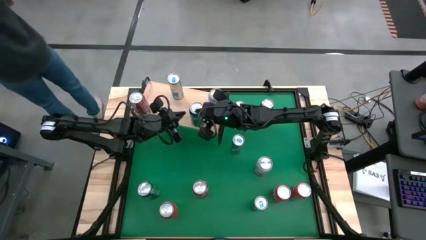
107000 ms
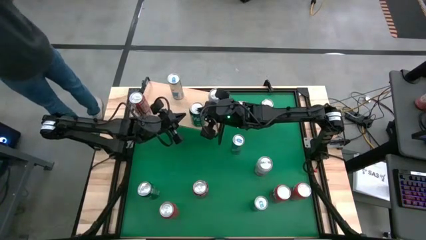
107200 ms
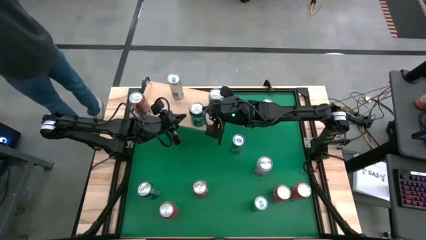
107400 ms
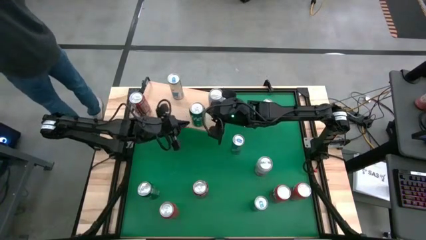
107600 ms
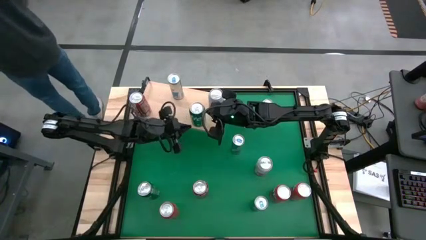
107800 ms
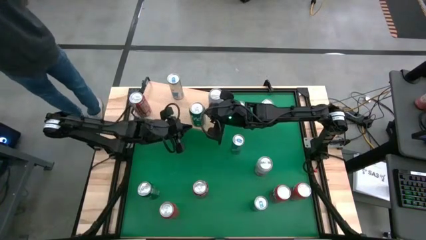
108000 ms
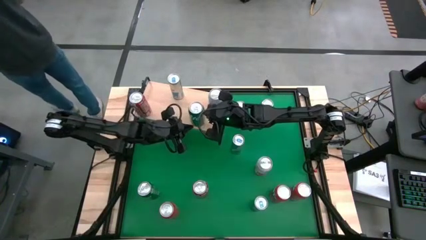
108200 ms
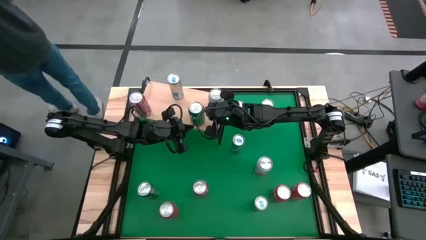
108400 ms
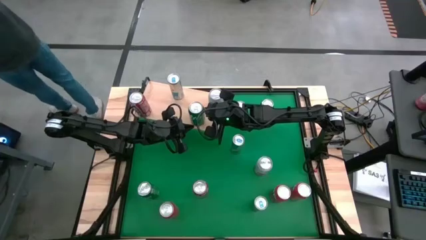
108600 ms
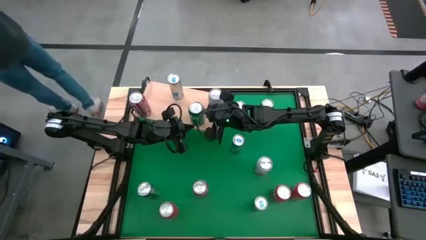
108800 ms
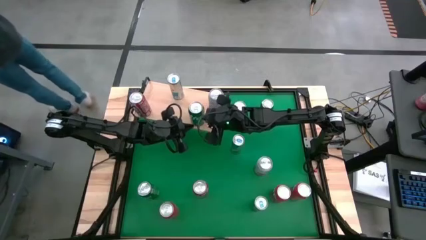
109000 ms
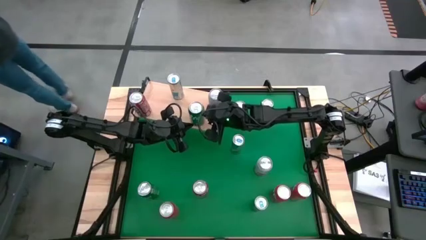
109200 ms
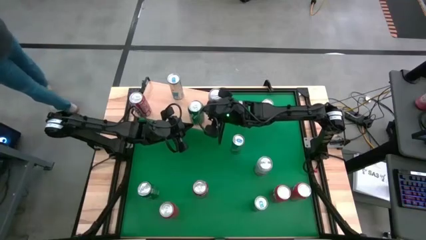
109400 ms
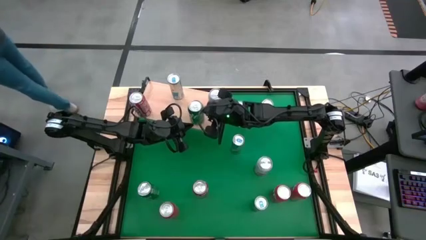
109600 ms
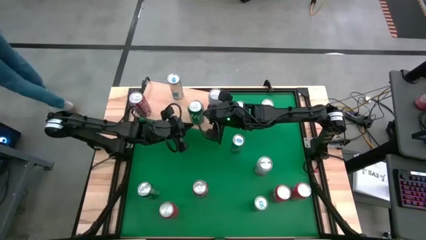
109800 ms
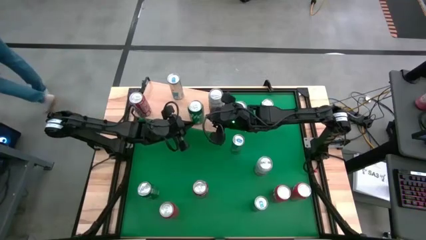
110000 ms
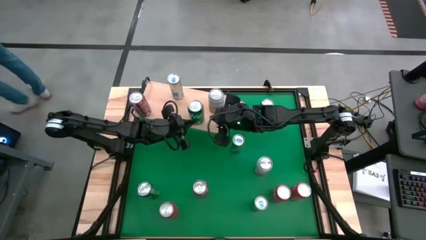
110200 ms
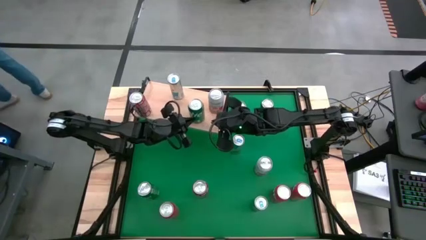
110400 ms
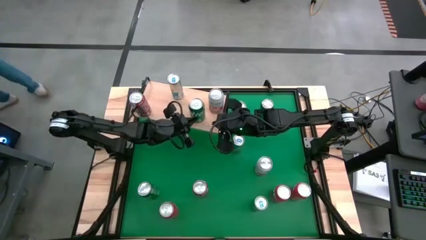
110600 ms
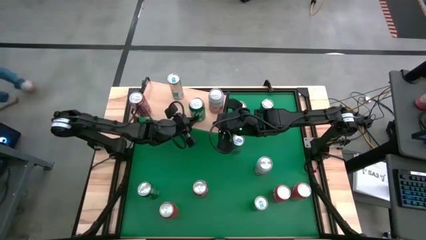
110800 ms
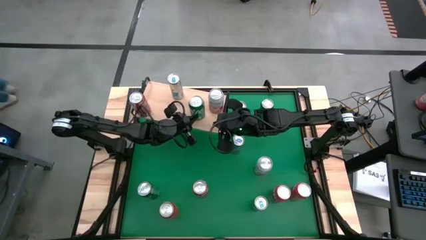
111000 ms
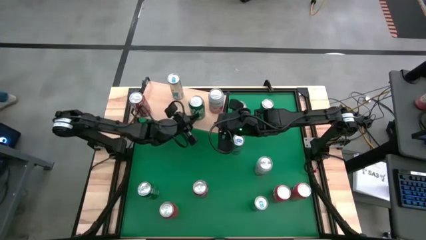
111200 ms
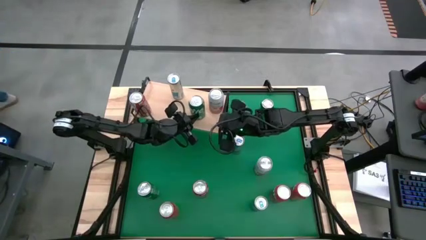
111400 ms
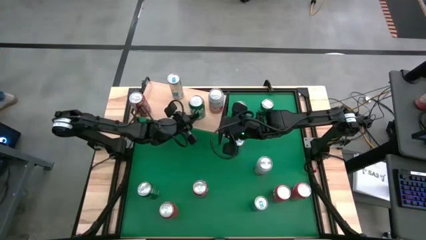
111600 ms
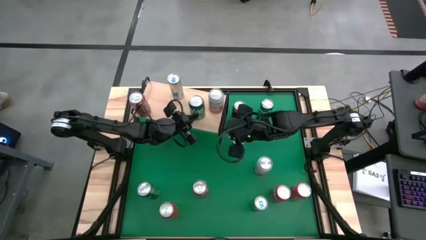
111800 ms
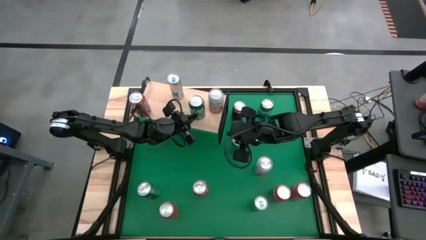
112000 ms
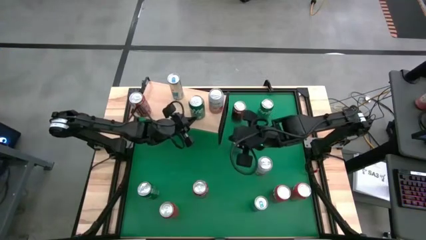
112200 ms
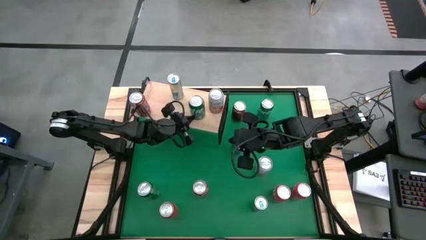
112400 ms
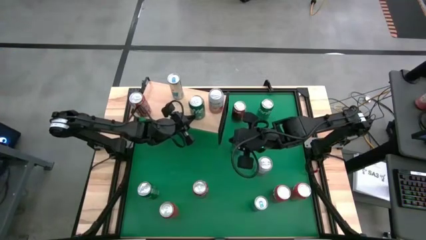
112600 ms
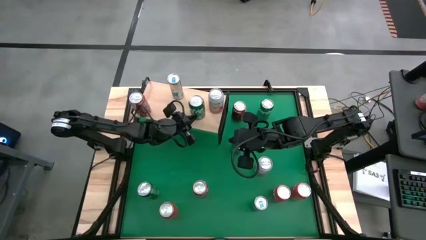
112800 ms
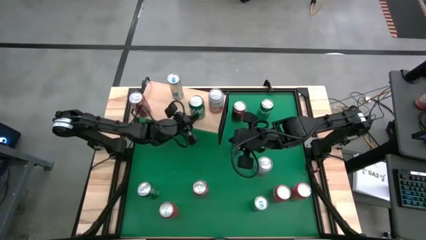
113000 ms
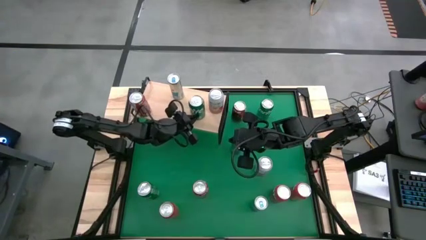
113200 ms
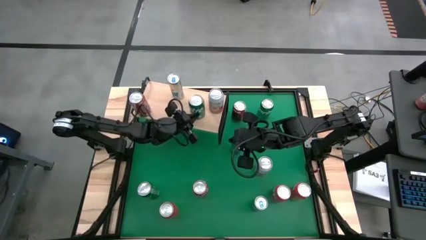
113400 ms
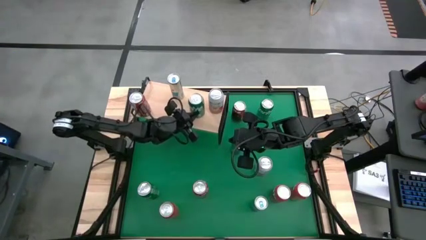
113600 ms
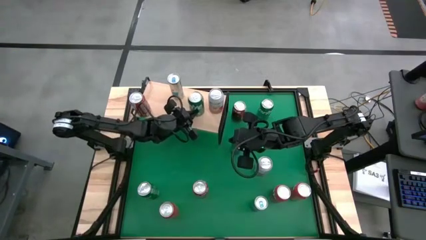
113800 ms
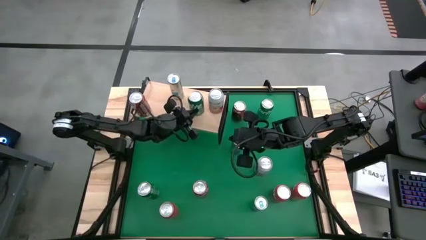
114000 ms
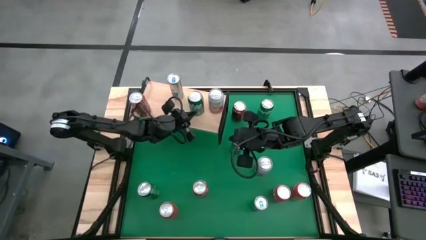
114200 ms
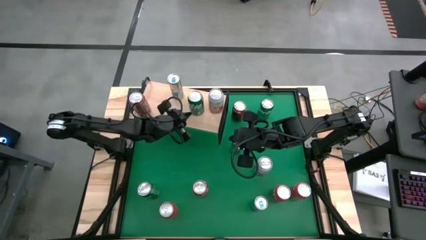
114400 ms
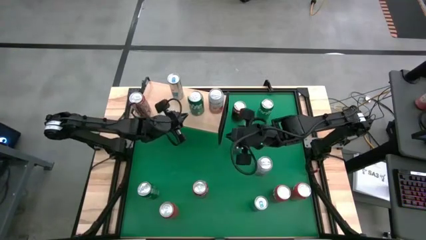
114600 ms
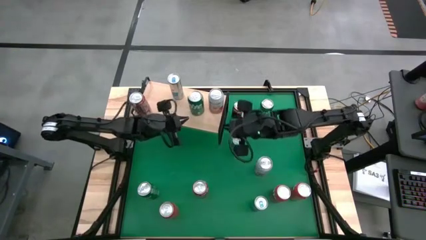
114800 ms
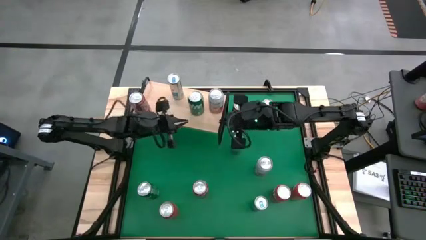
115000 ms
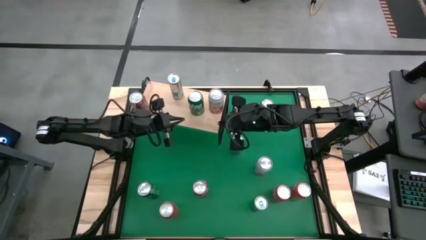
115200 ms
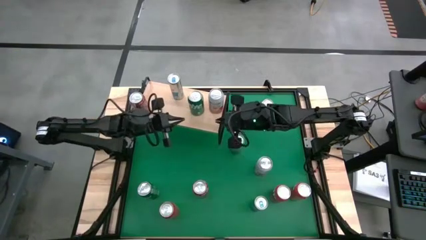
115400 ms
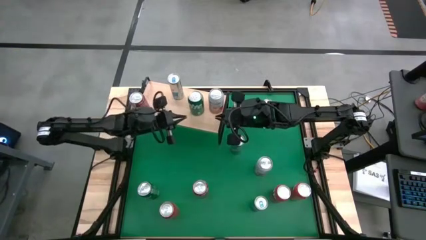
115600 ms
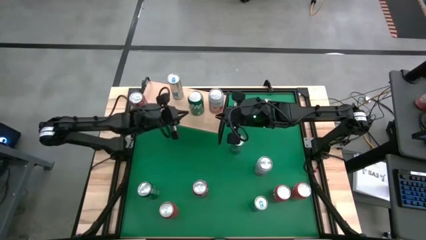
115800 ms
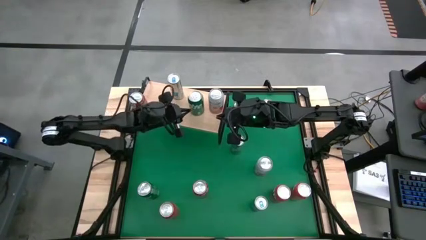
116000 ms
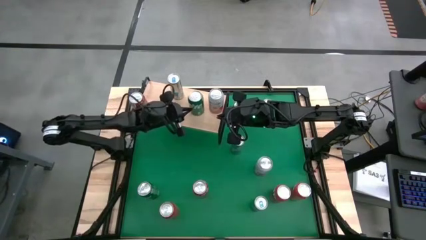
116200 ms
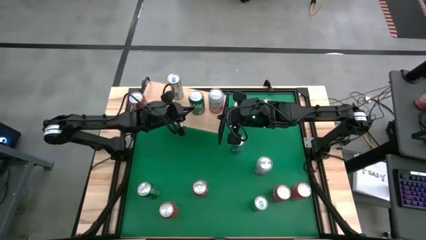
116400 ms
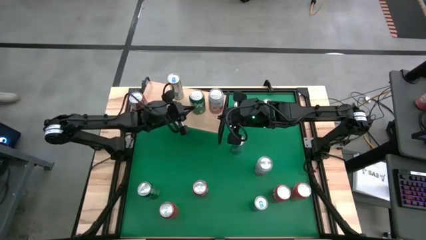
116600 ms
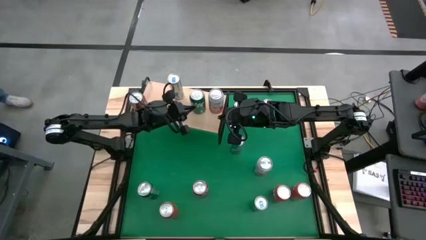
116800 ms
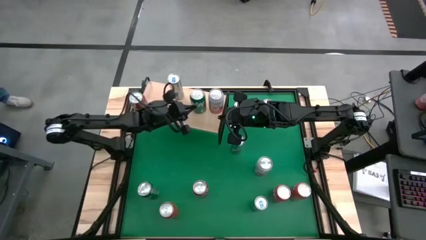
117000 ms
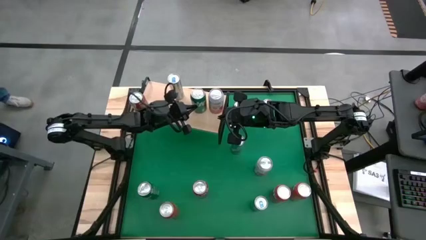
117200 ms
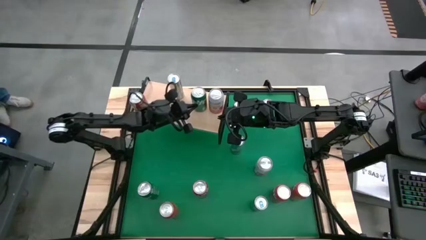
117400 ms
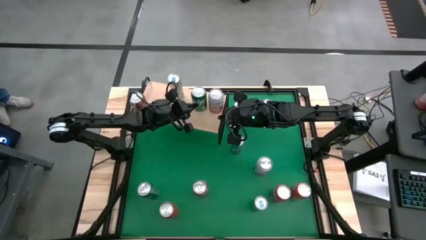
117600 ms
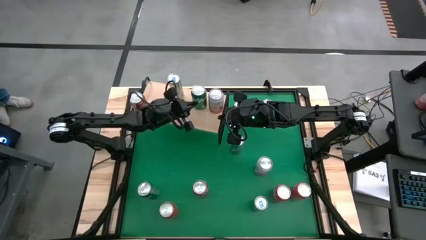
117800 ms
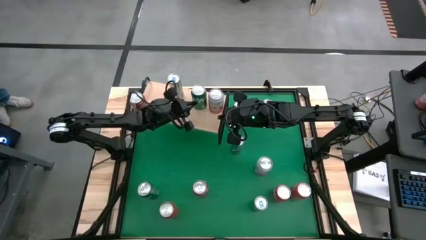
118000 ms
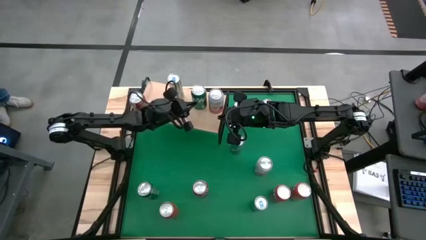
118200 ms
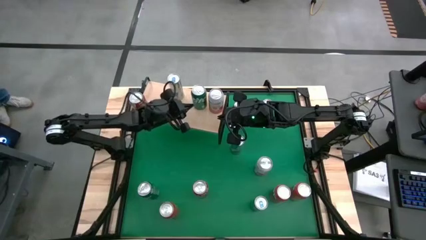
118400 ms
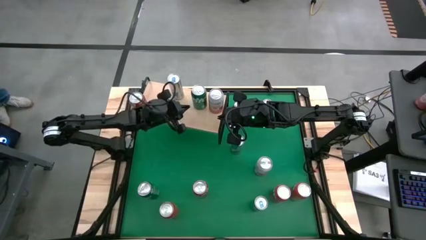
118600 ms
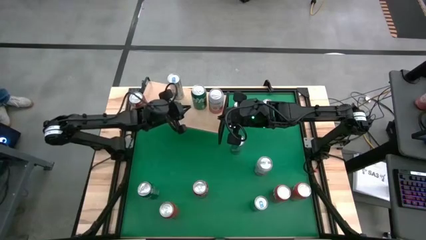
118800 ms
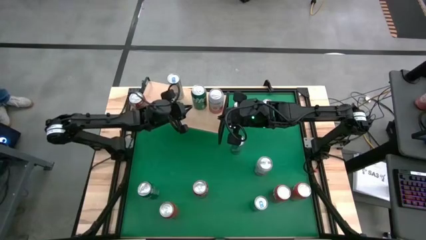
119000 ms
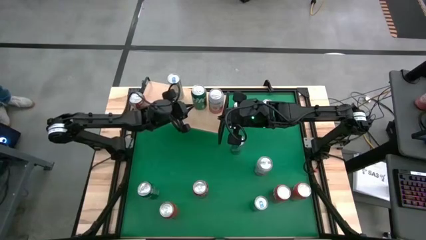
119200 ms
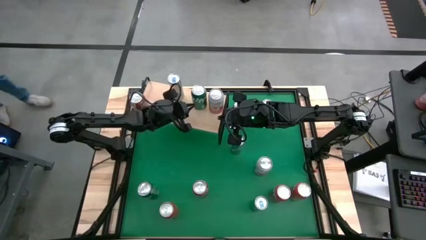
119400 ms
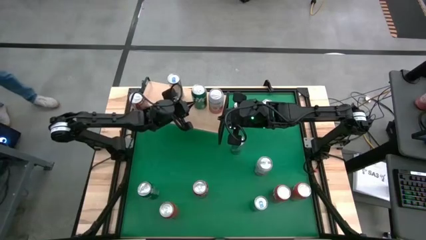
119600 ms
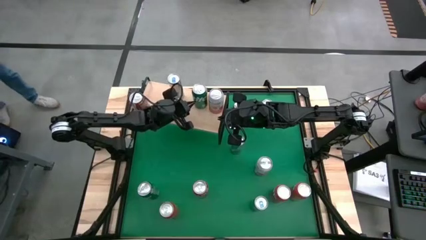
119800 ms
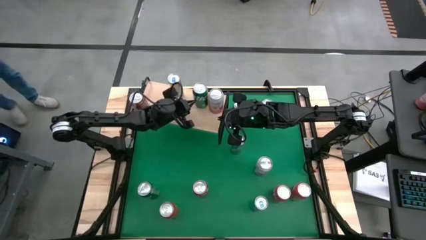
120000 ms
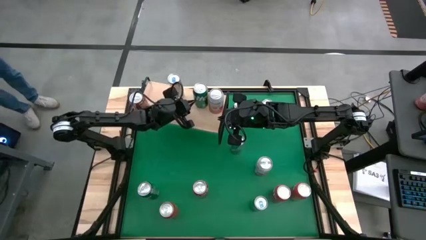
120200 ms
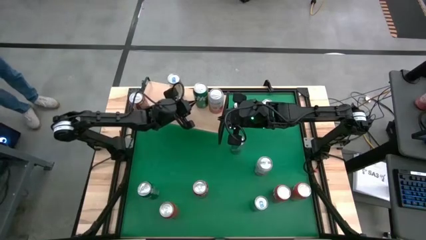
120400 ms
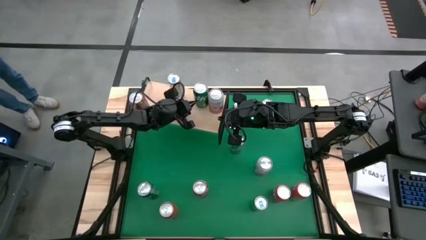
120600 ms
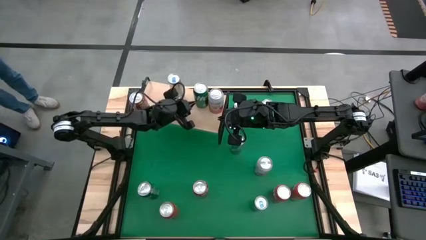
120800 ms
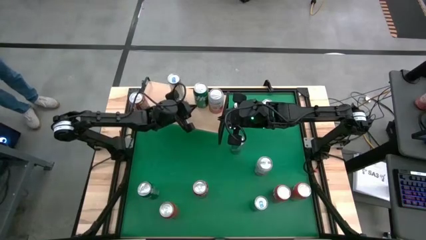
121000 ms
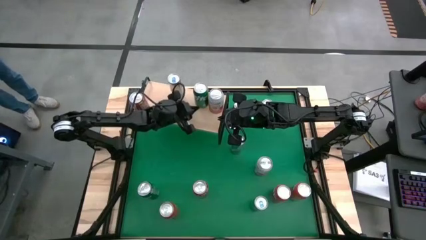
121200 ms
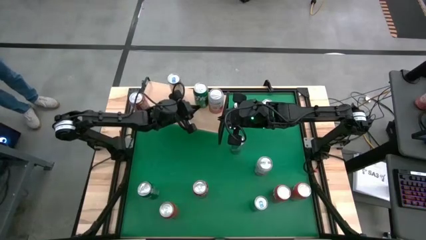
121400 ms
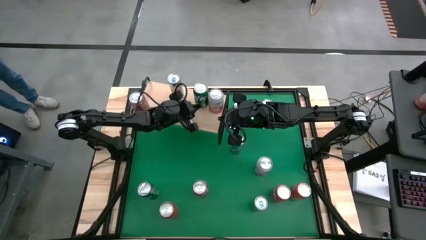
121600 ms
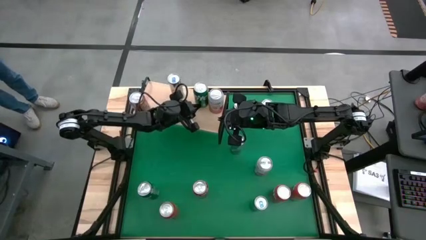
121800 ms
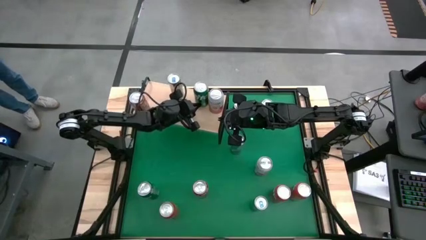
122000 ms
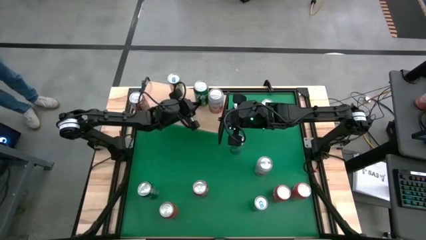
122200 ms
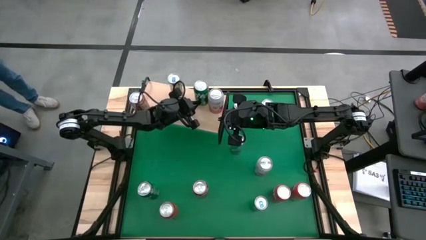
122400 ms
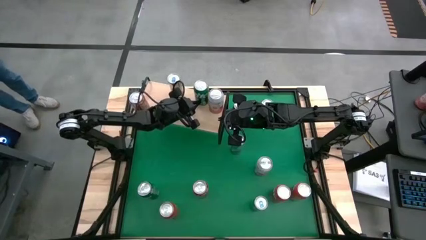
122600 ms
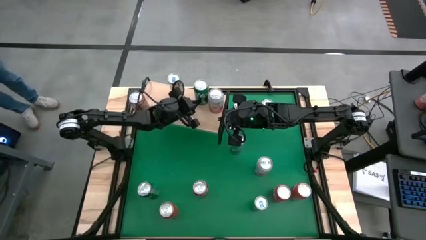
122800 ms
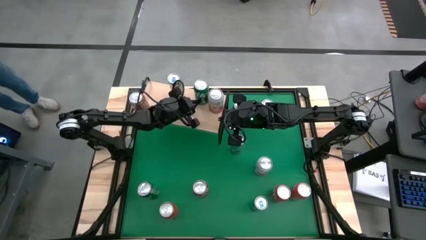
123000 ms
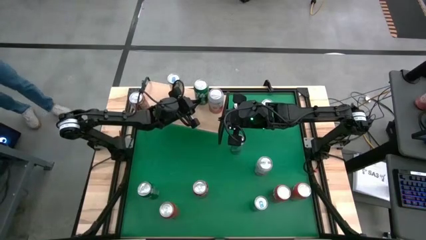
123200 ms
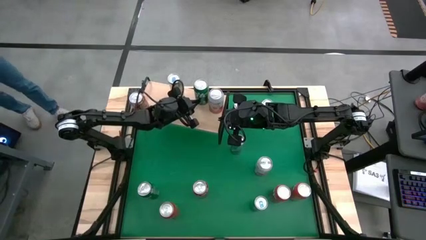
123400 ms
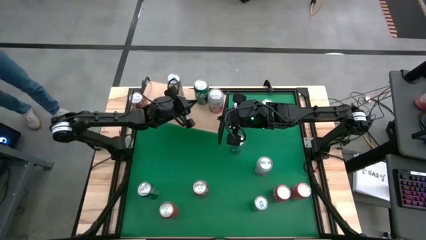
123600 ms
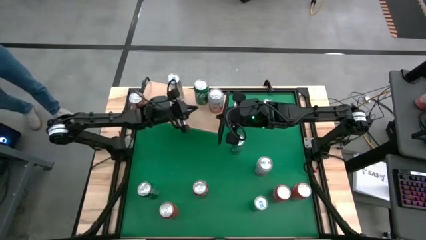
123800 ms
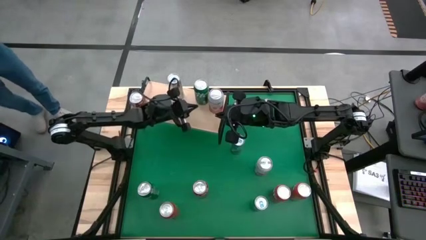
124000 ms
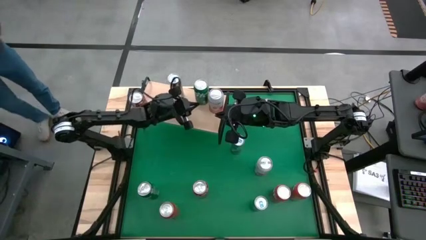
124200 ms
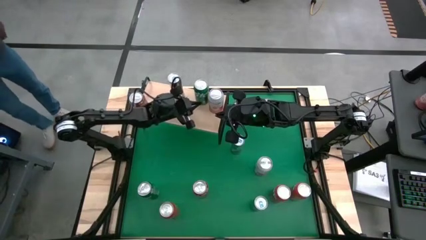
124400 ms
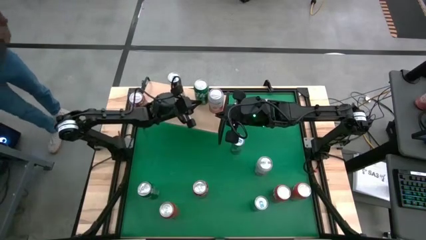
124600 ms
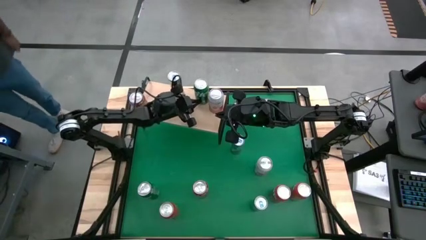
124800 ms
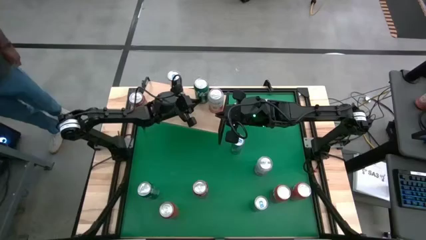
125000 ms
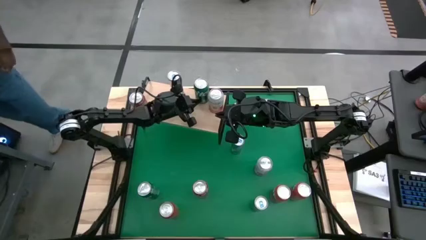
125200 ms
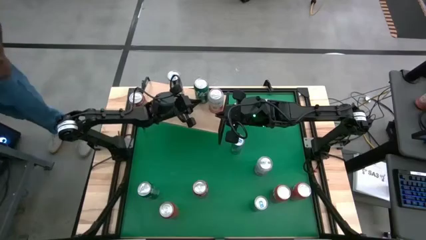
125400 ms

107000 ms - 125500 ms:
Task: Place canned beverage on shelf
Put the green soda can on the shelf
